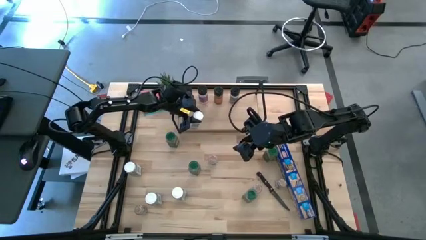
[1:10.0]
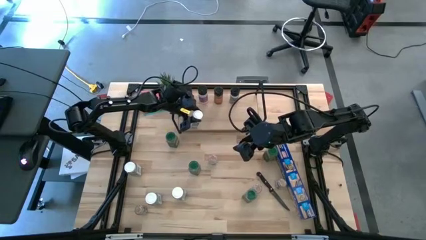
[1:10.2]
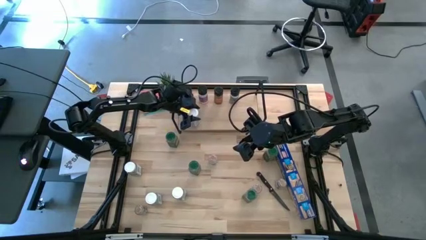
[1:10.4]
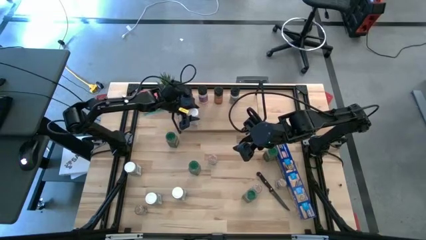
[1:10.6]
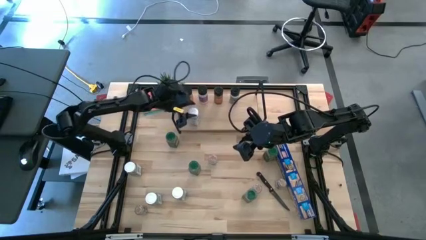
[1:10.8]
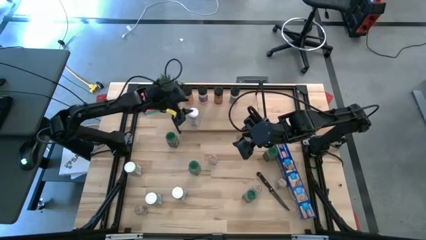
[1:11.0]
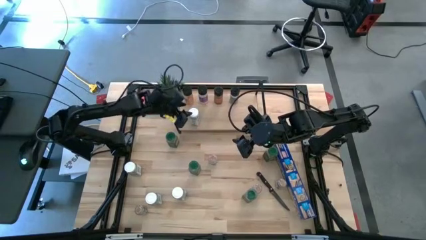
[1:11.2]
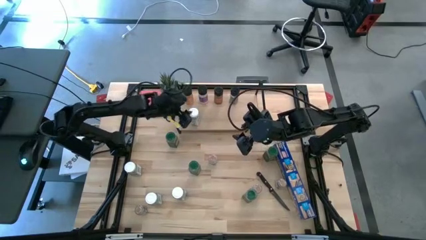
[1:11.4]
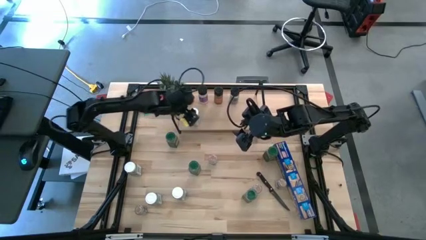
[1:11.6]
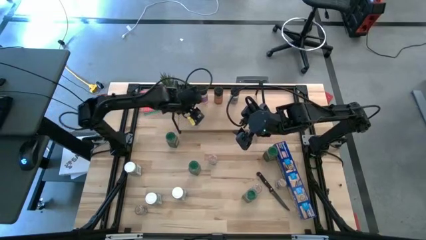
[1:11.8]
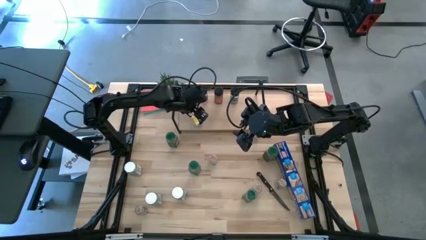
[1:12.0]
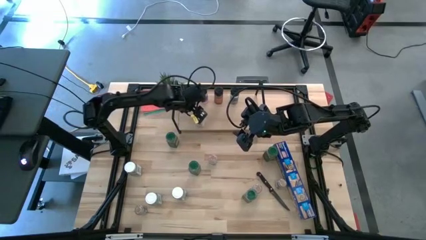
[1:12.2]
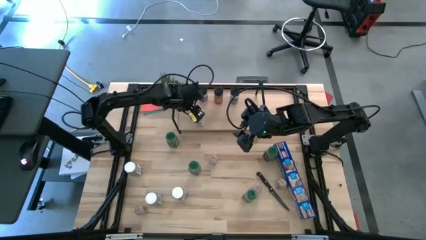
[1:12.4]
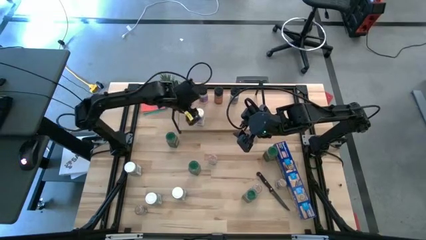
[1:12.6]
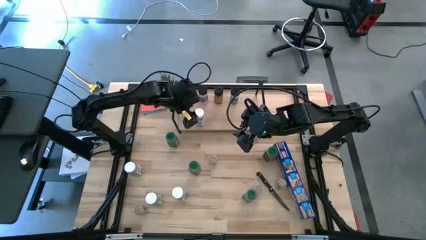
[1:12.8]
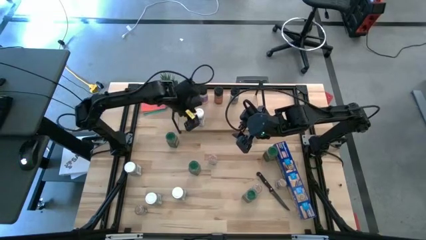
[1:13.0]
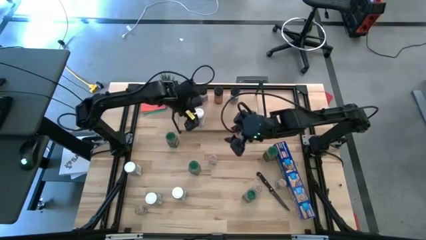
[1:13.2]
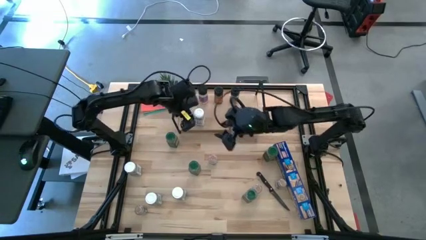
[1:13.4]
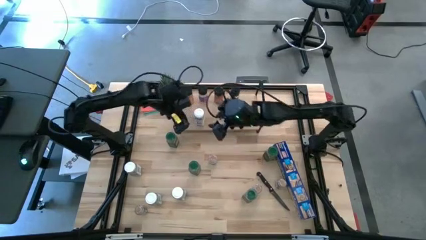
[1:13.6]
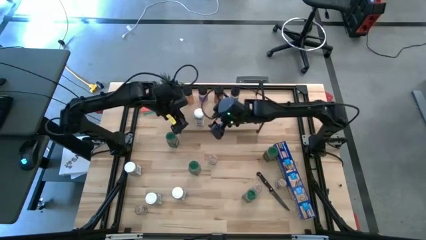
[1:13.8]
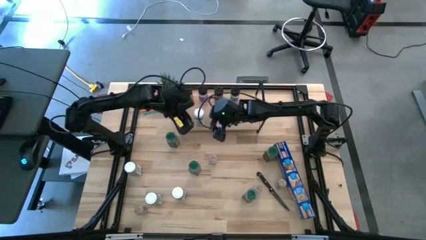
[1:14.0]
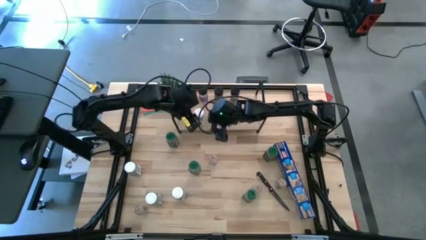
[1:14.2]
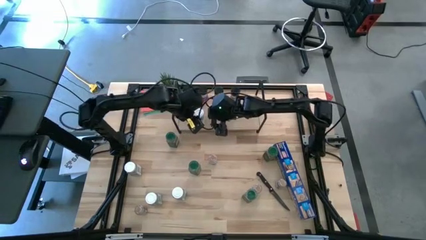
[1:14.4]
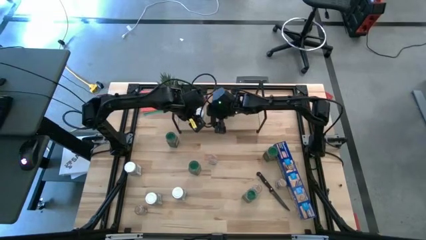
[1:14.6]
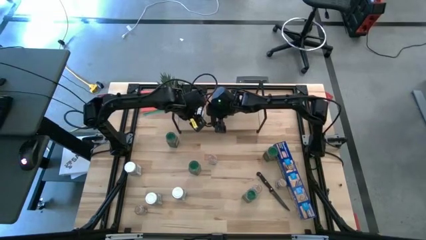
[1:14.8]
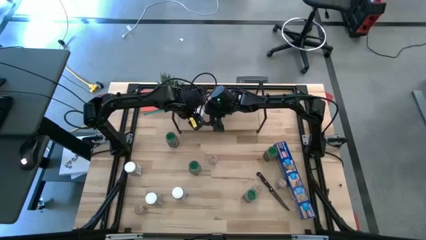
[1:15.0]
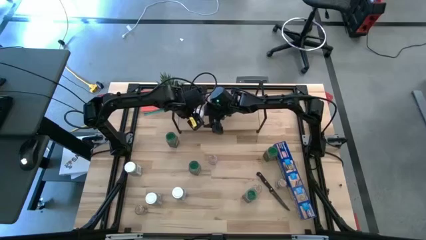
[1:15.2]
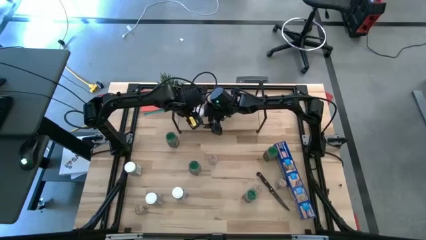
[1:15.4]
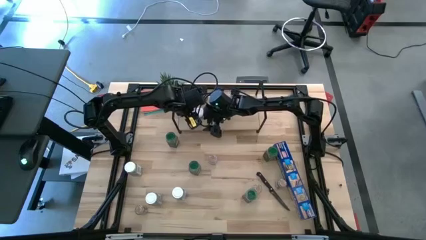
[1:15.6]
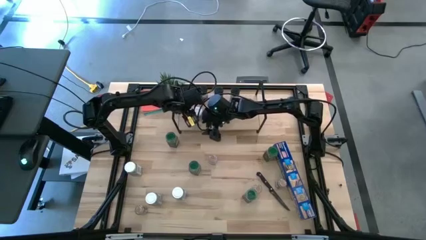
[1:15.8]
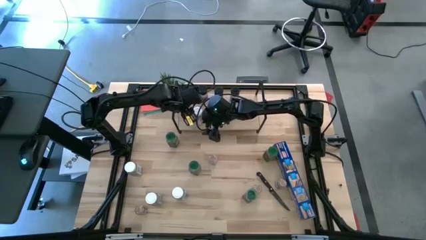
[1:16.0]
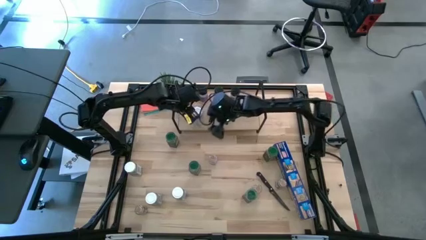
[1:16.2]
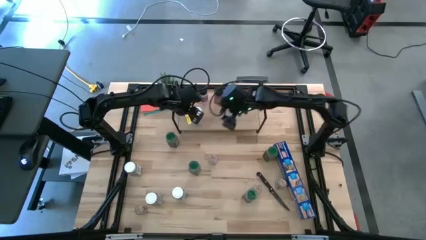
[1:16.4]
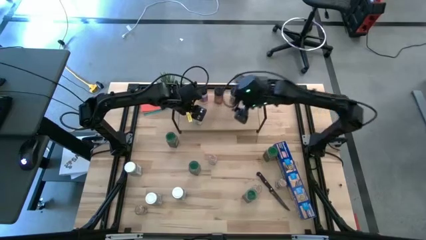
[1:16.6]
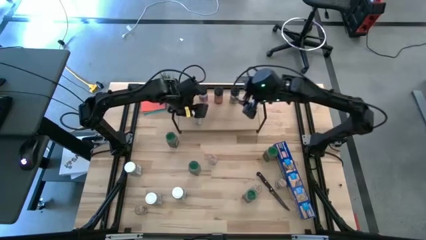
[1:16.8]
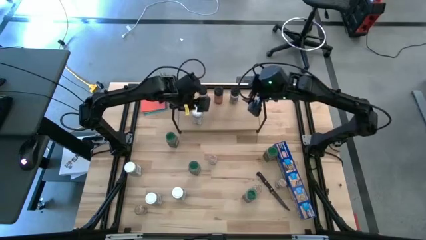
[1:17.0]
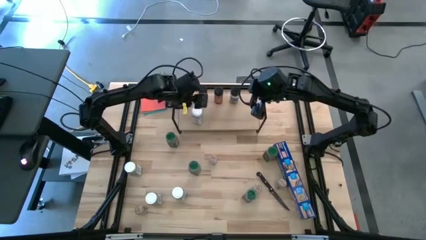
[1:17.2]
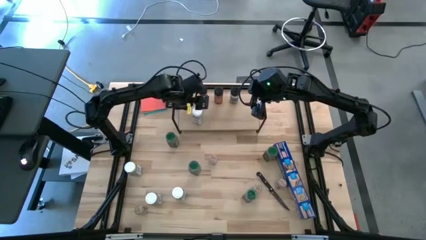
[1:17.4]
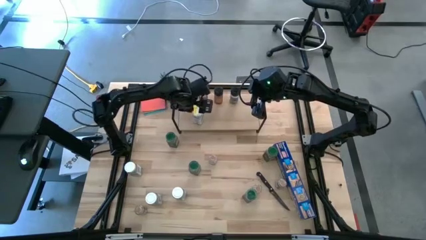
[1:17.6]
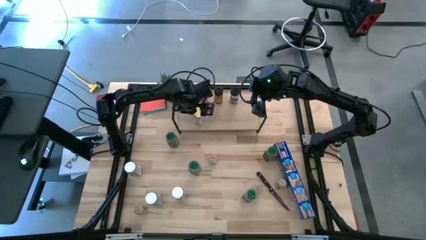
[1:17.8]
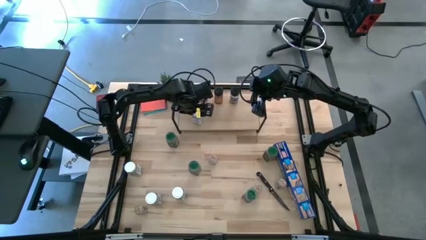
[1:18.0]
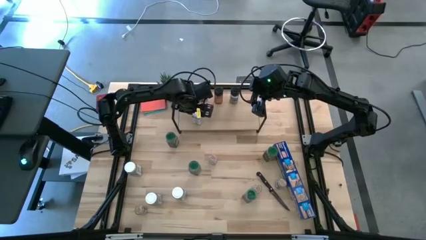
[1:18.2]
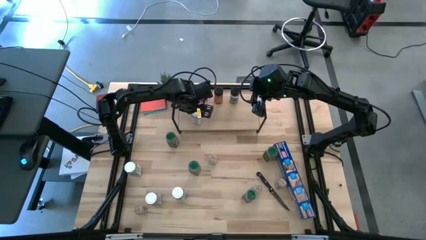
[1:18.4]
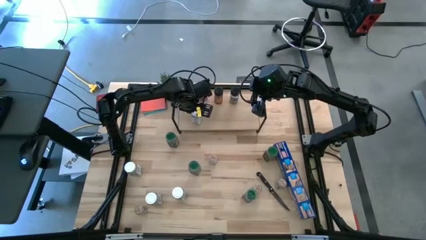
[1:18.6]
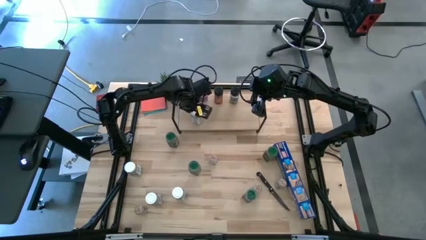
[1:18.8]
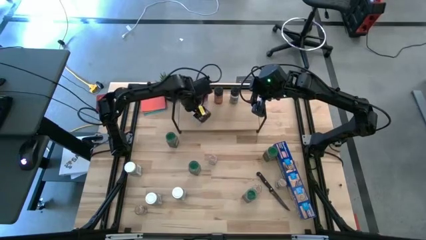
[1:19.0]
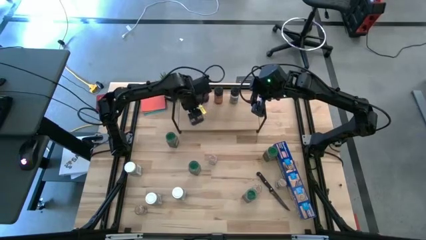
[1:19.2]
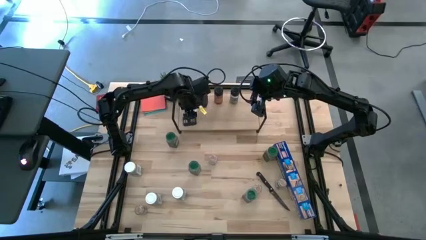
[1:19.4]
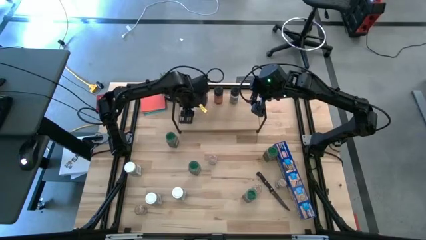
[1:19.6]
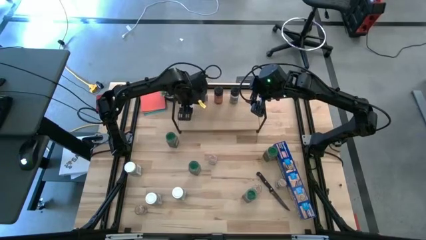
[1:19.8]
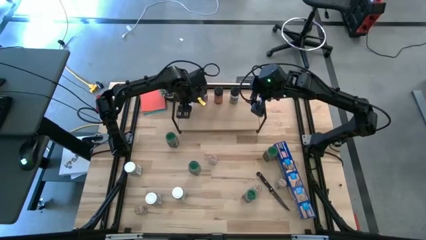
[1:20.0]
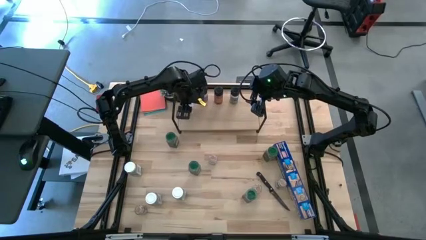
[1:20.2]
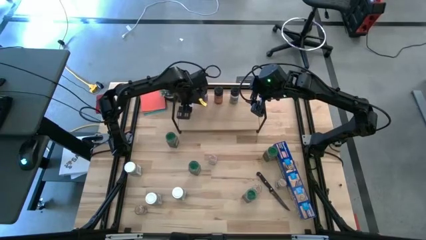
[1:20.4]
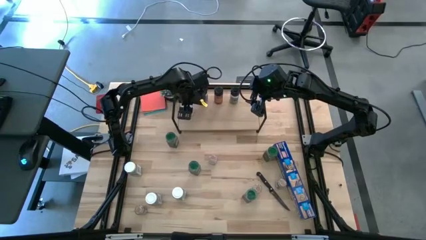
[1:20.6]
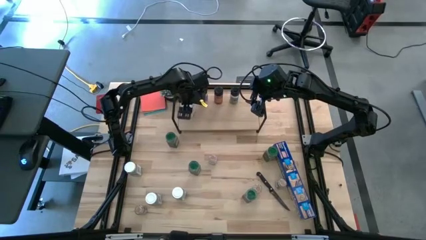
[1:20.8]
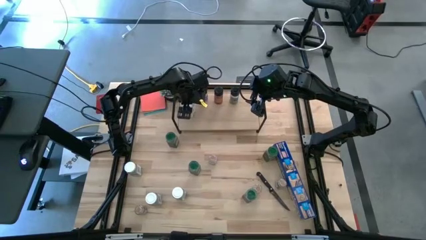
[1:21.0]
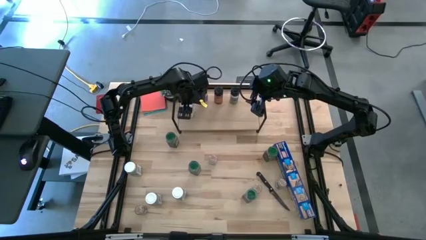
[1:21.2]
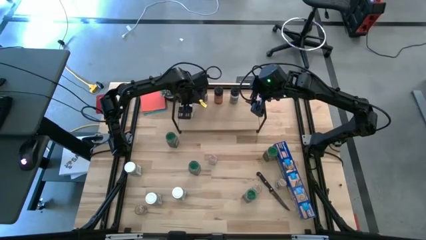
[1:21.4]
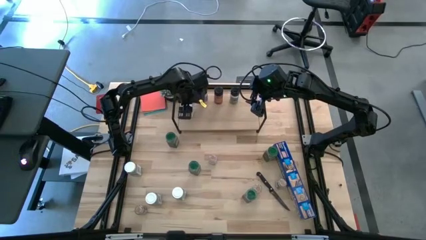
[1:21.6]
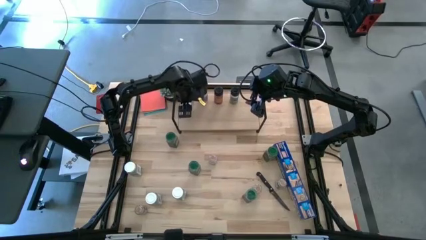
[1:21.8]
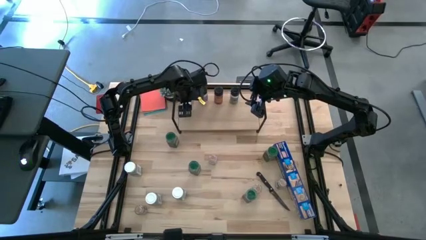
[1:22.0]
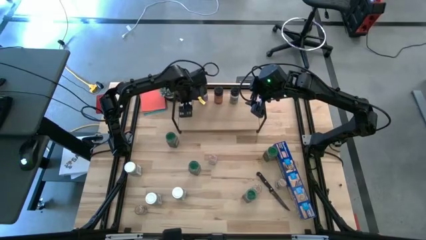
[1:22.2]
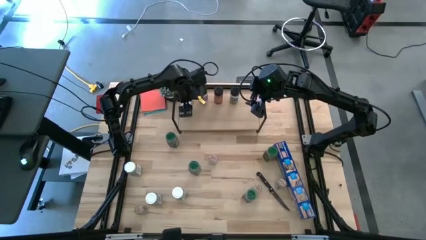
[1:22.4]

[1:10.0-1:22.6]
Task: Shelf spices
Put the white seasoning bottle on the shelf aligned with the black seasoning bottle
